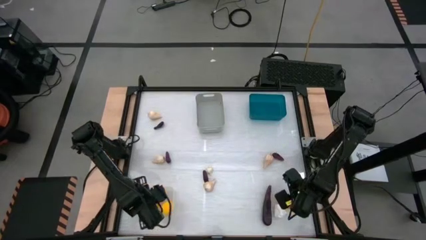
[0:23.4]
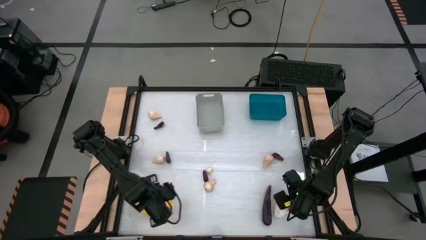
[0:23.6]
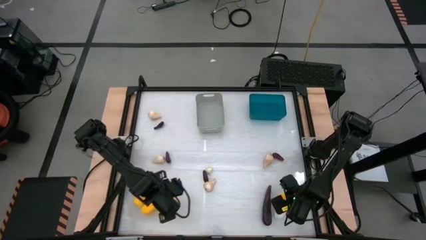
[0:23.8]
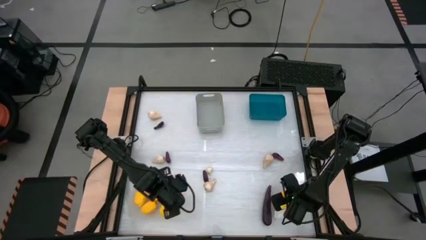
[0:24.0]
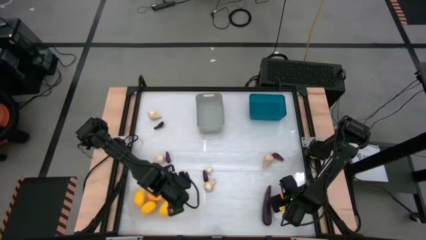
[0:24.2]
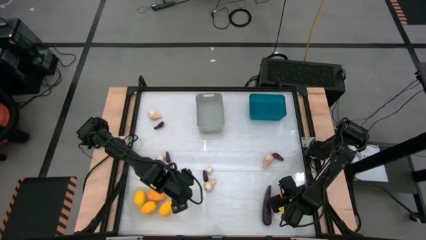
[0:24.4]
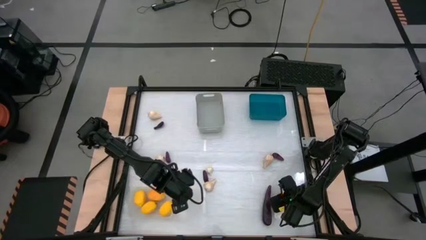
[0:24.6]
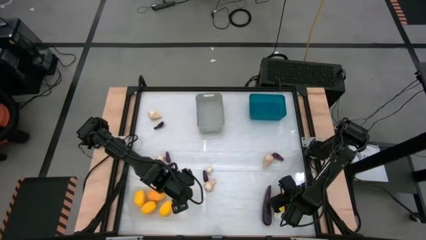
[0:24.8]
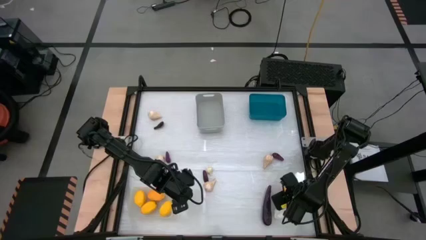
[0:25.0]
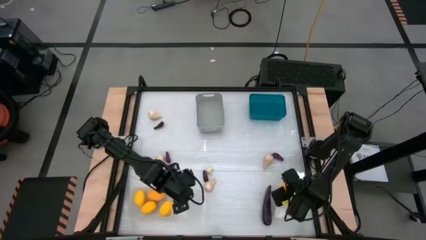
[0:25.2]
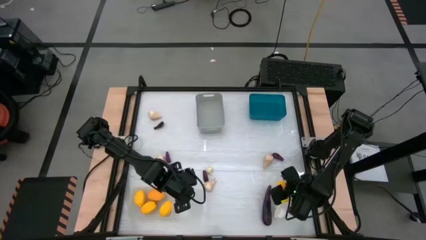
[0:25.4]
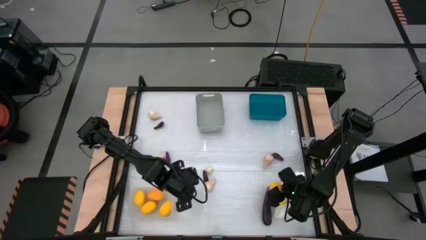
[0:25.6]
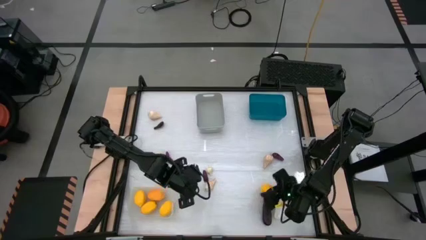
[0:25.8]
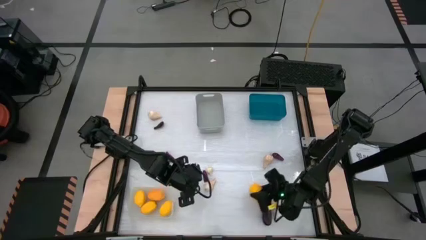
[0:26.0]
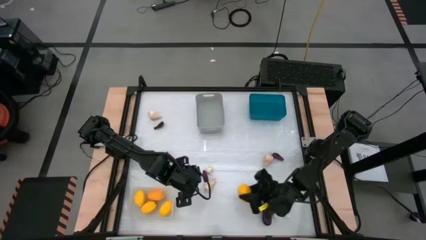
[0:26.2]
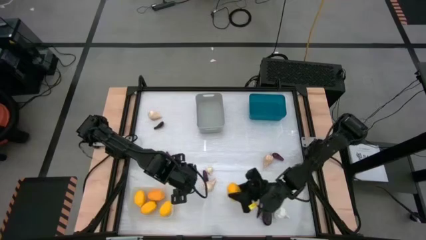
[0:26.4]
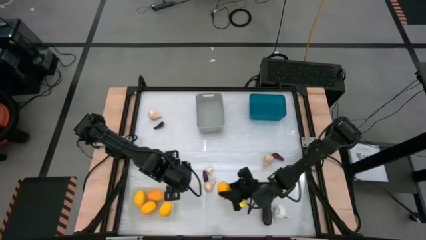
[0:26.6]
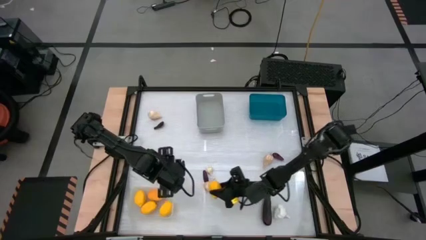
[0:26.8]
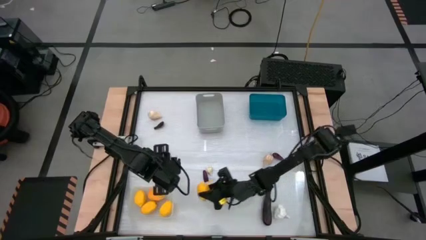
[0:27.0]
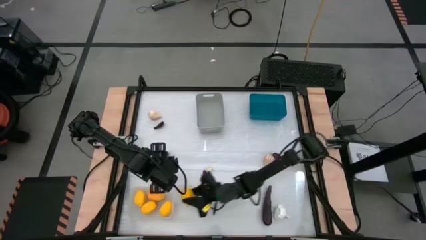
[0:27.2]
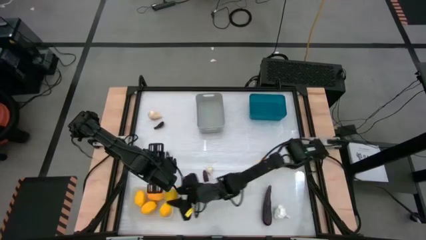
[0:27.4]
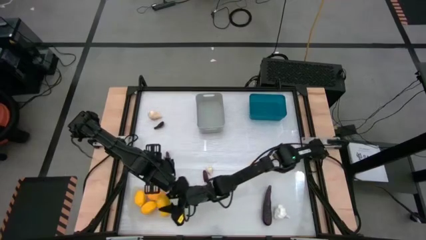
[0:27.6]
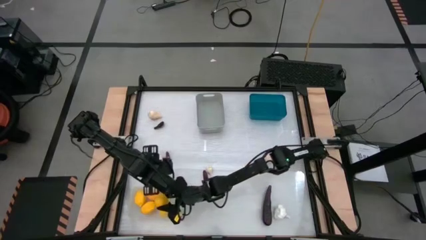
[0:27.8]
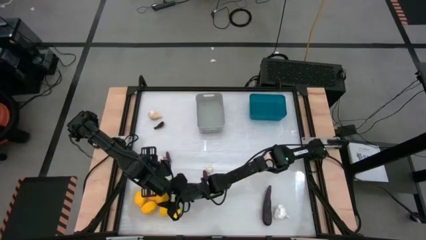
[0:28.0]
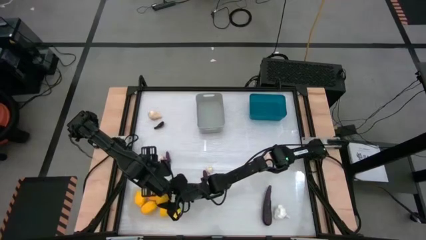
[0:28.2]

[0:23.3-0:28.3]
Task: Sort produce into baskets
Put the lemon into the transparent bin

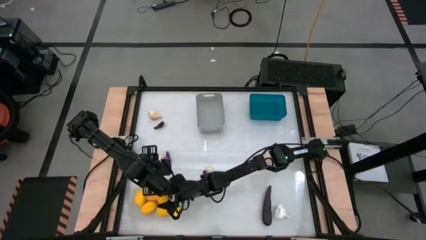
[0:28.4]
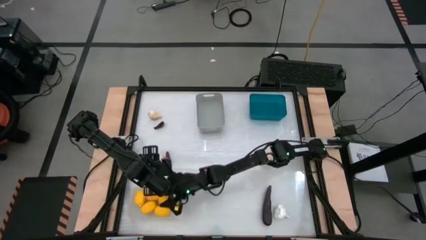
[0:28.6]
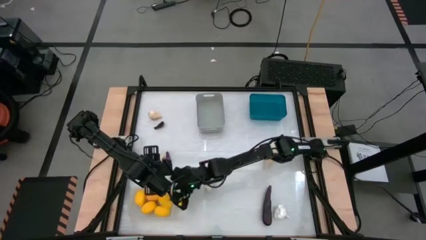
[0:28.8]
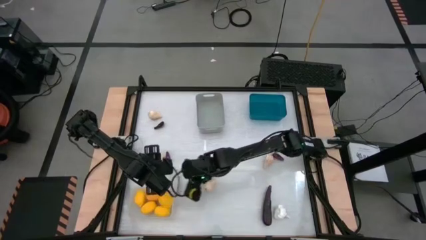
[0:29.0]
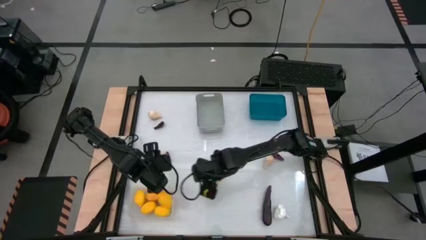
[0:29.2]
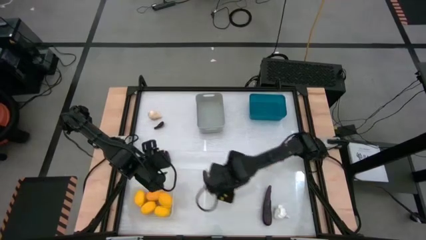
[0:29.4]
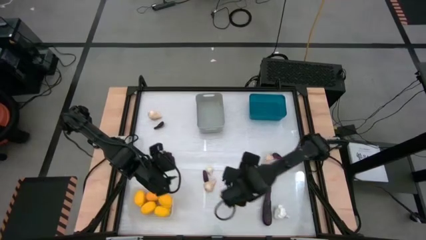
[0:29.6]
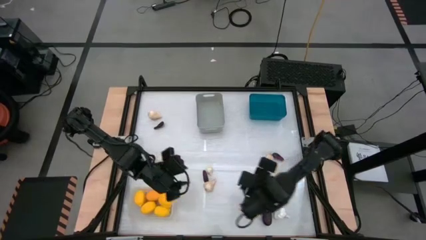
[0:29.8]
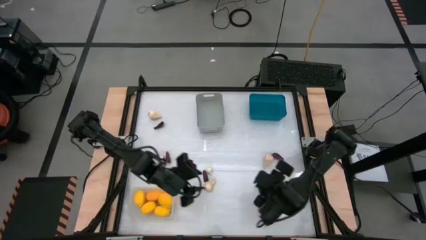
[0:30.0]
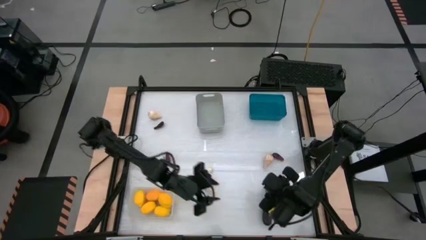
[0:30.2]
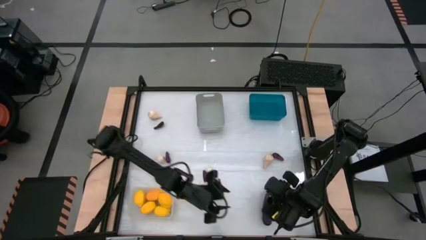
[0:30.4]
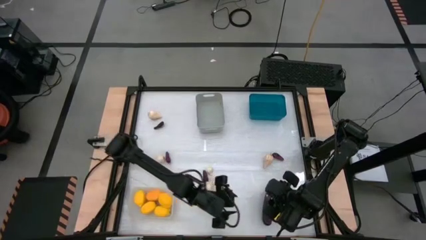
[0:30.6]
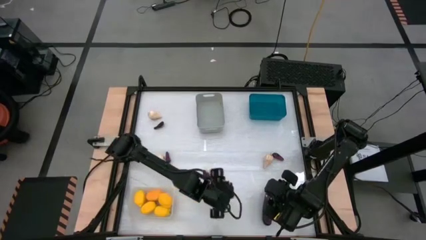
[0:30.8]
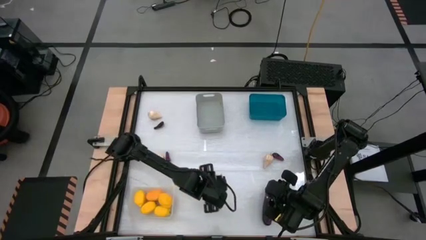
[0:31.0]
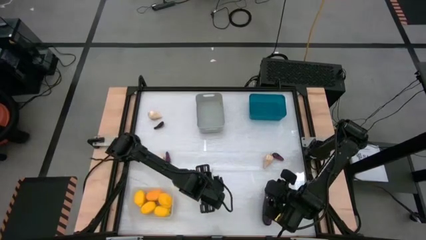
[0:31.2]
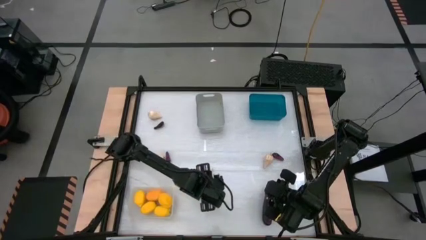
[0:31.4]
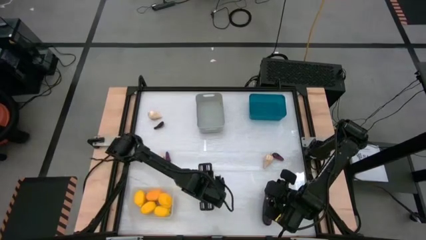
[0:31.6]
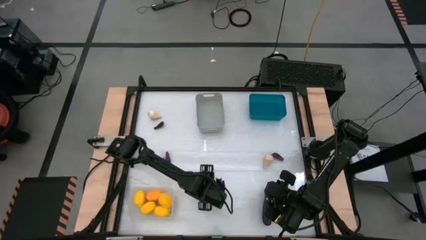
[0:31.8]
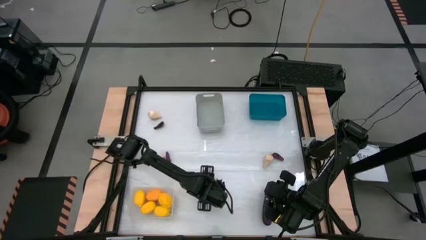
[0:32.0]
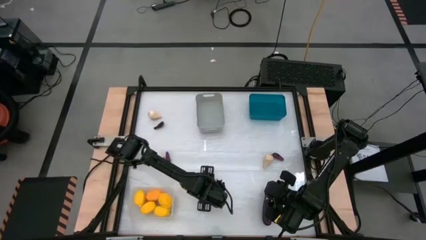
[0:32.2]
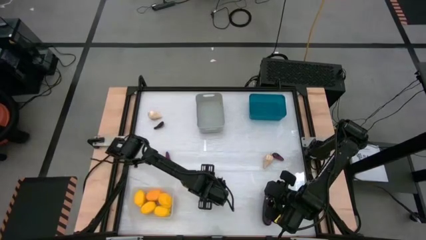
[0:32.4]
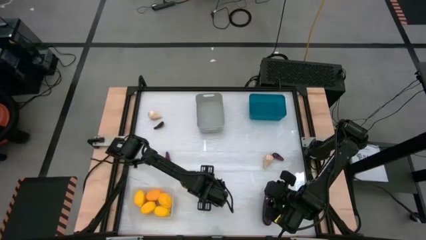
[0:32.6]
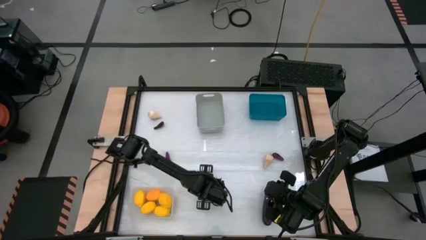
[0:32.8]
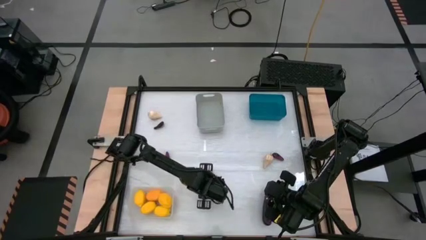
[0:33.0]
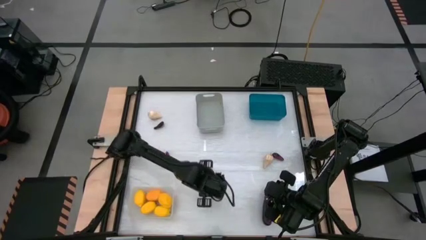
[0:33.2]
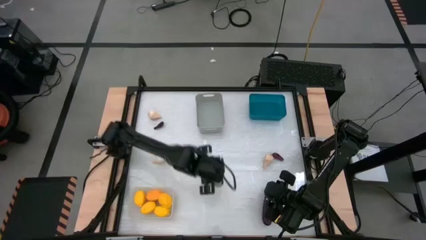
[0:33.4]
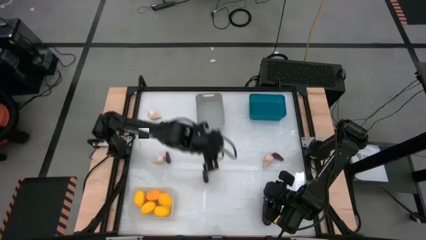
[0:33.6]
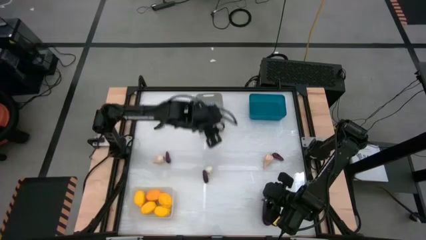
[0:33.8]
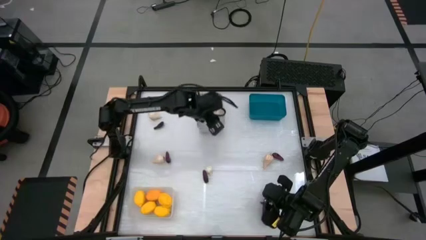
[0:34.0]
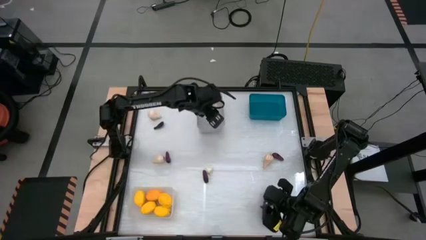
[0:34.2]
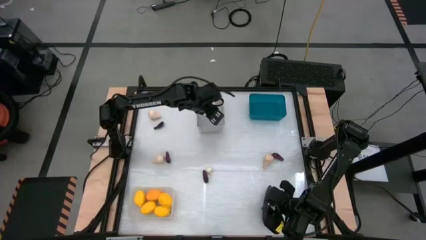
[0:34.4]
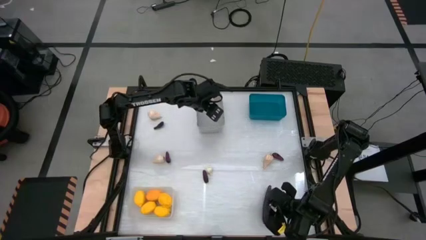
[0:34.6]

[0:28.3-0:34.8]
Put the garlic into the white bin

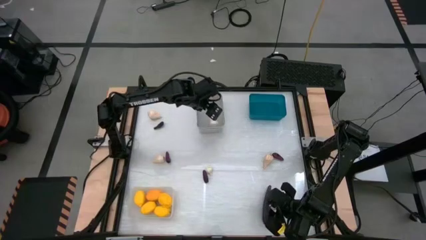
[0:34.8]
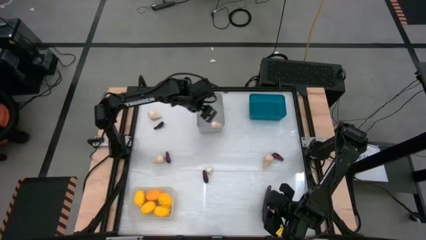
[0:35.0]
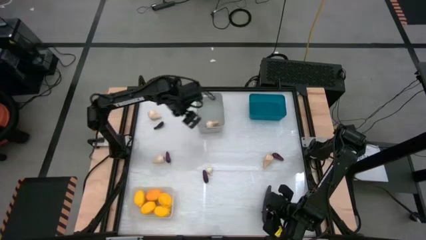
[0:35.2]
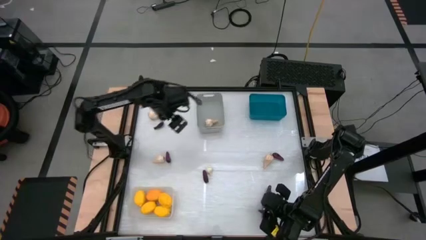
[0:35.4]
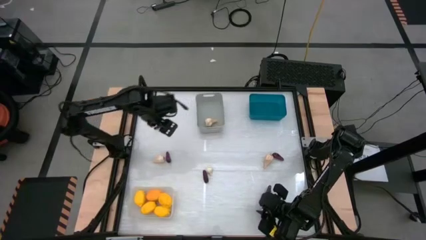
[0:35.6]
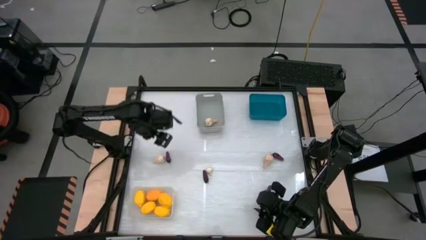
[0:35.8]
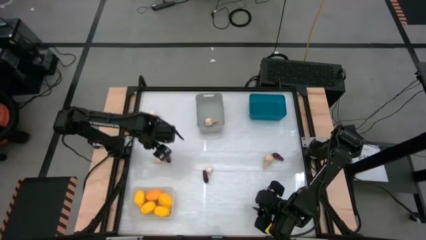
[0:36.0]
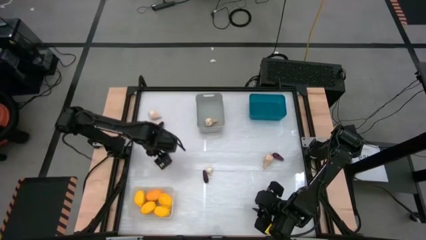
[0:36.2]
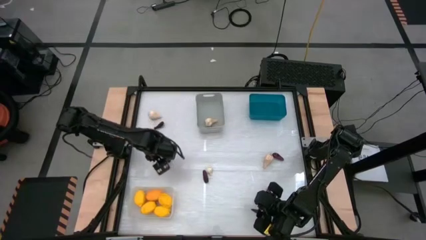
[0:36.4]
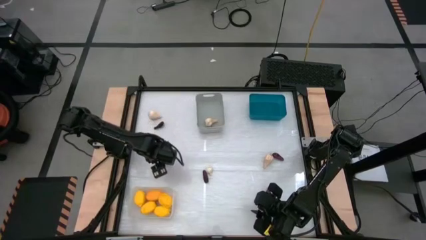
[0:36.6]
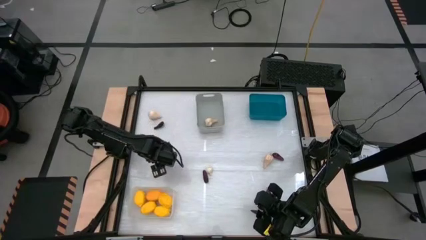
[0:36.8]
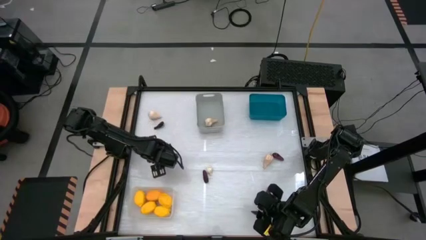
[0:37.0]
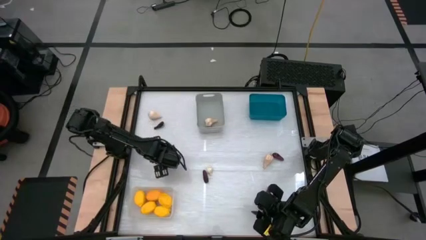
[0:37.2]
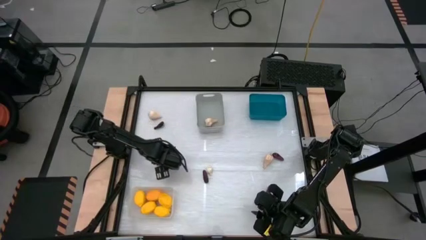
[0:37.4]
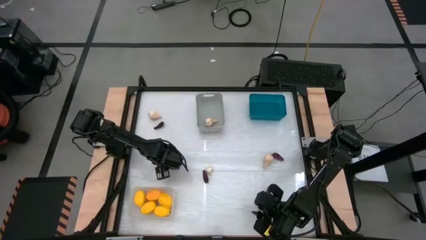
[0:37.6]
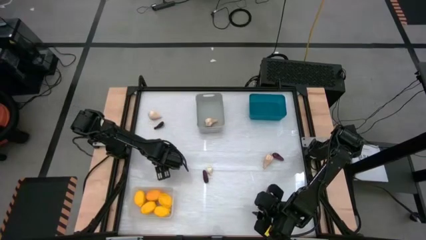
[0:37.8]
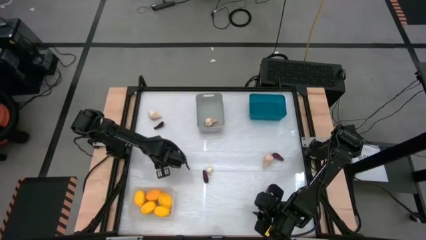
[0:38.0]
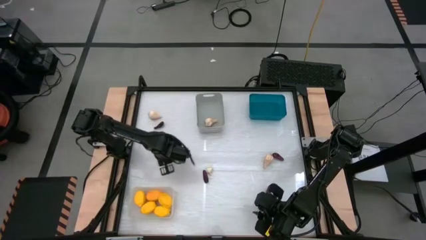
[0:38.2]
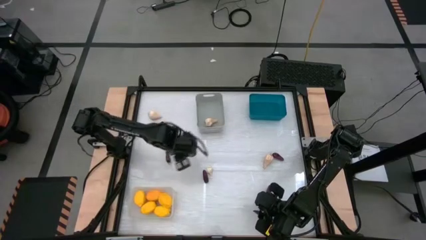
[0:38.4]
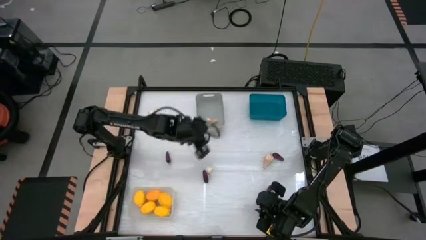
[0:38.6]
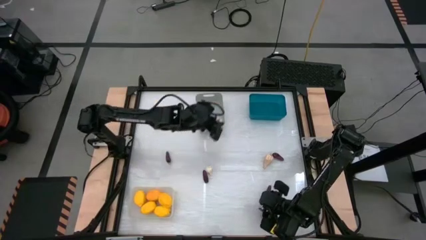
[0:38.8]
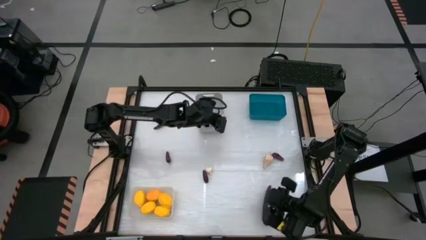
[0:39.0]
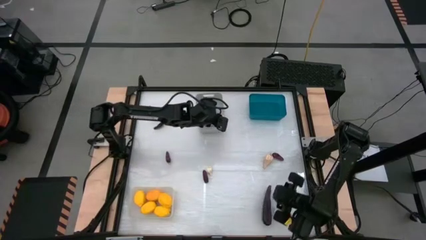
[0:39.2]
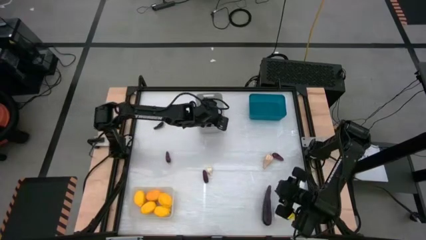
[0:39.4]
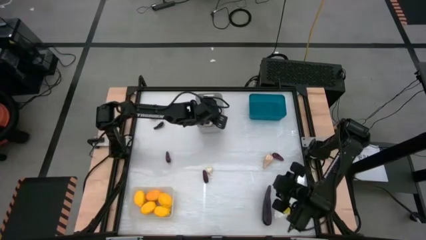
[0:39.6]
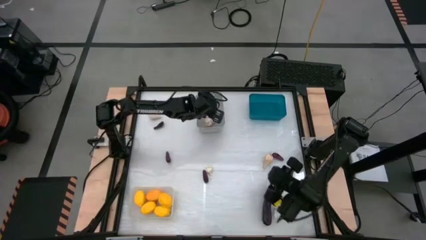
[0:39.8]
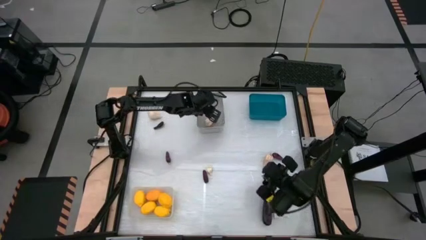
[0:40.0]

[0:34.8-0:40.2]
Put the garlic into the white bin

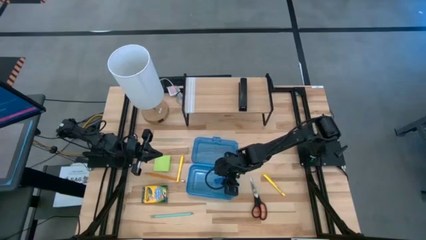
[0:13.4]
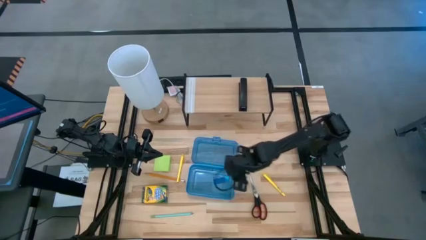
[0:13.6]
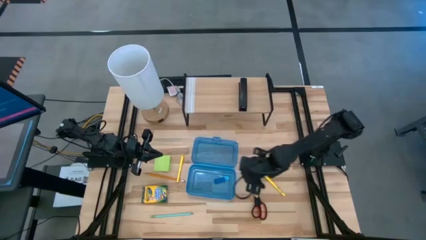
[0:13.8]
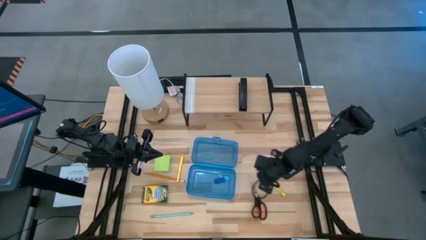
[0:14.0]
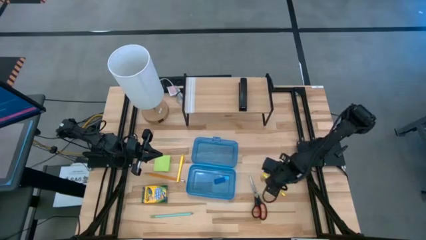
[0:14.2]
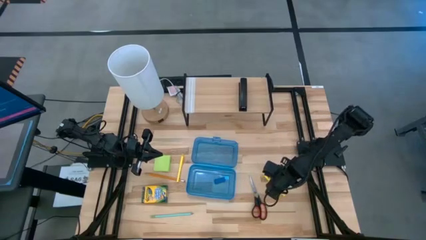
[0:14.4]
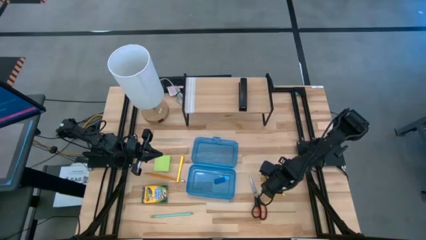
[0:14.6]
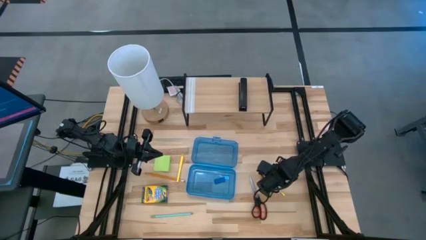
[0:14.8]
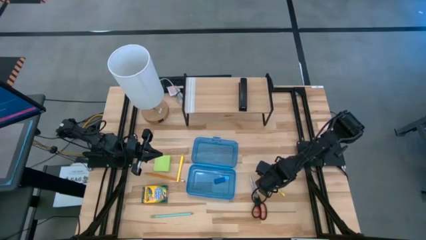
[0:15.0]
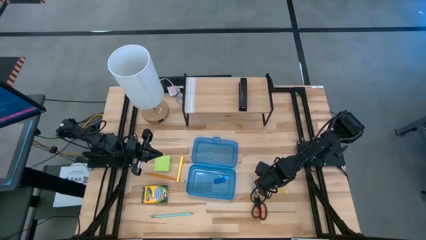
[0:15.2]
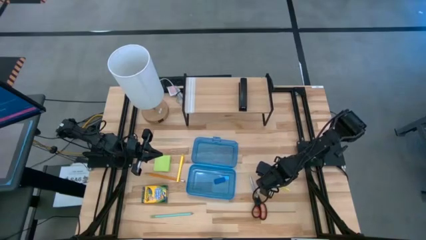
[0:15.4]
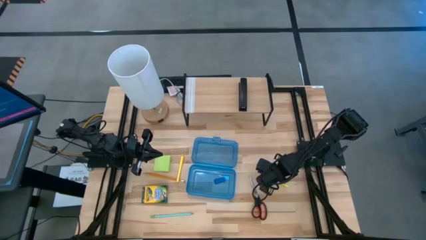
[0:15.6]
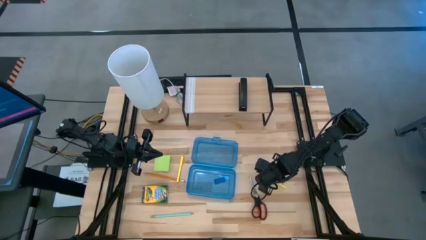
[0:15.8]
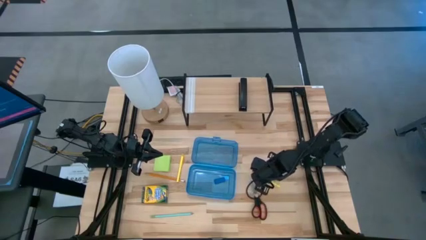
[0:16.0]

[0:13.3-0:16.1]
Task: Pack school essentials
Put the yellow pen into the blue supply box
